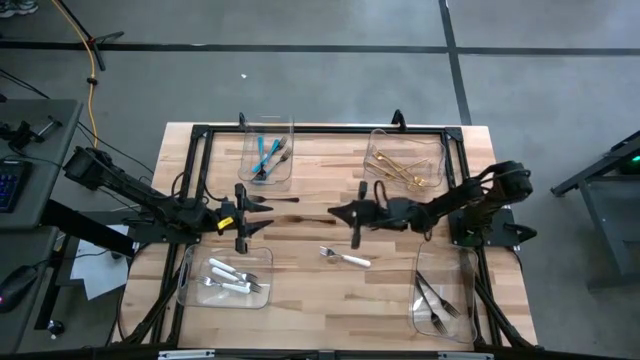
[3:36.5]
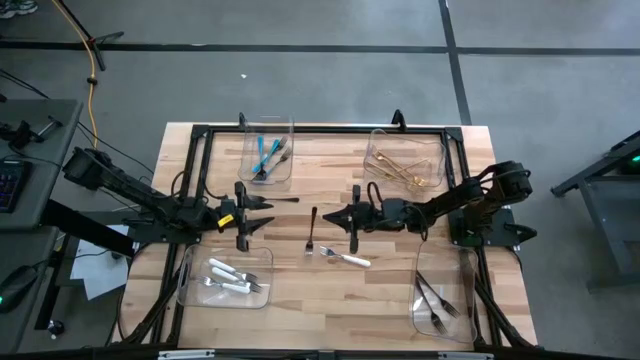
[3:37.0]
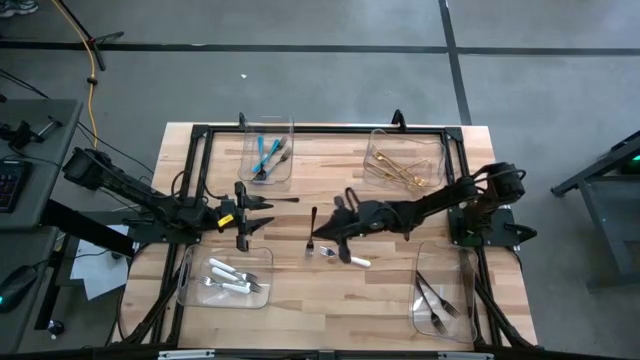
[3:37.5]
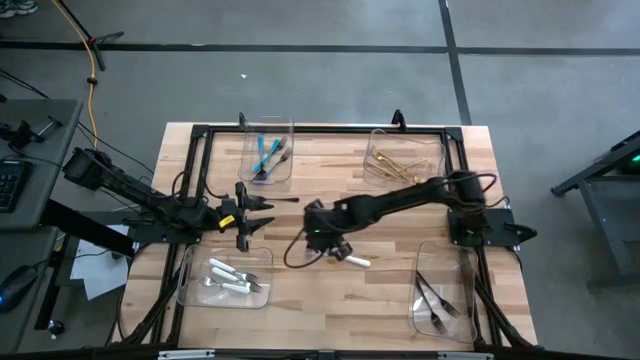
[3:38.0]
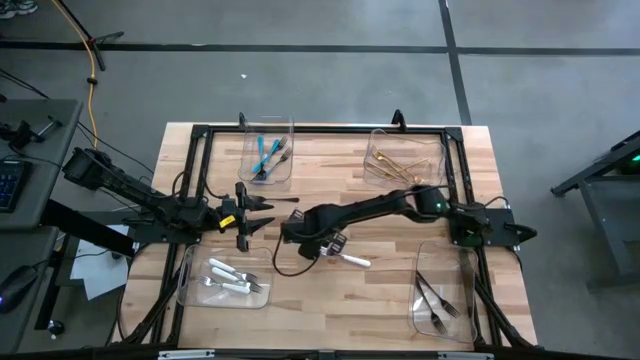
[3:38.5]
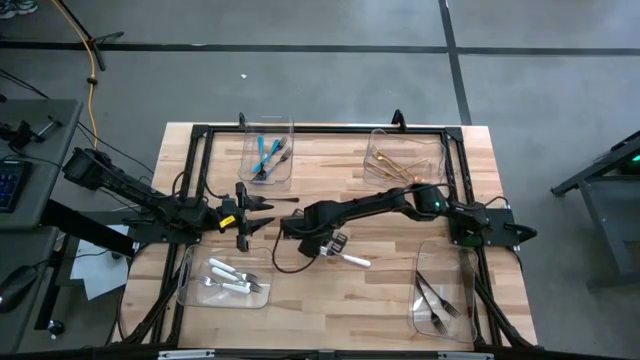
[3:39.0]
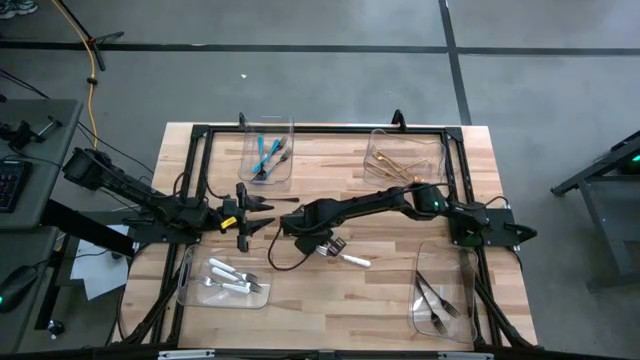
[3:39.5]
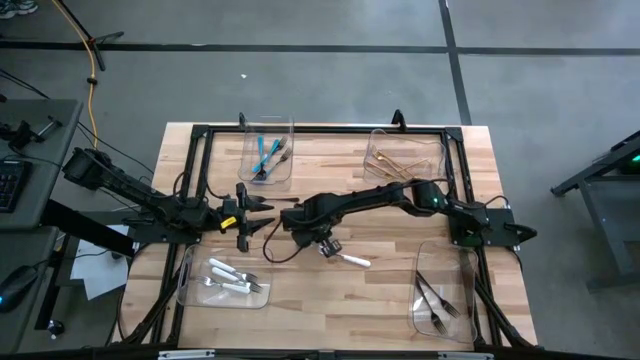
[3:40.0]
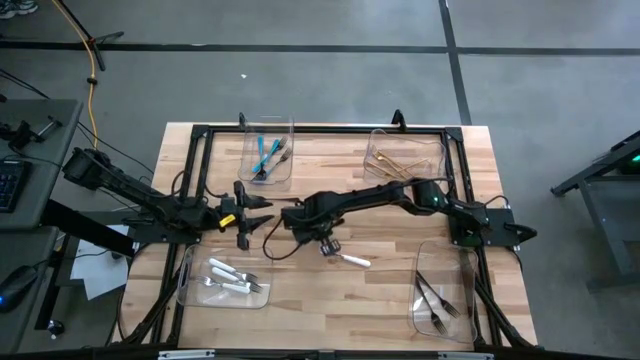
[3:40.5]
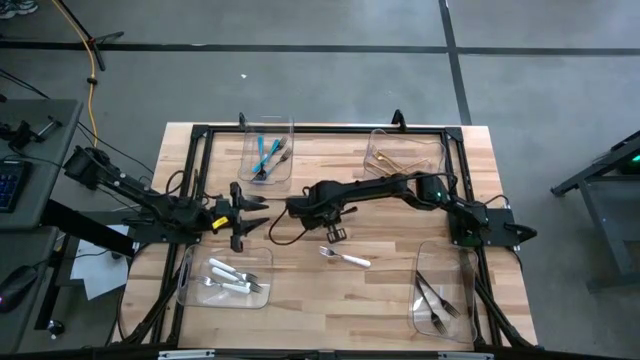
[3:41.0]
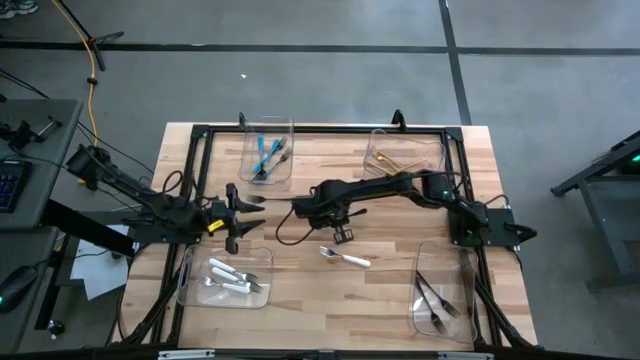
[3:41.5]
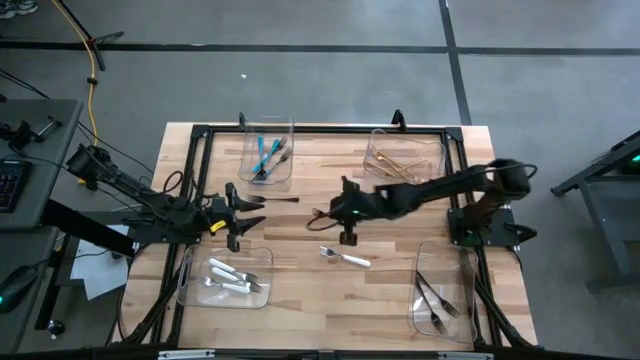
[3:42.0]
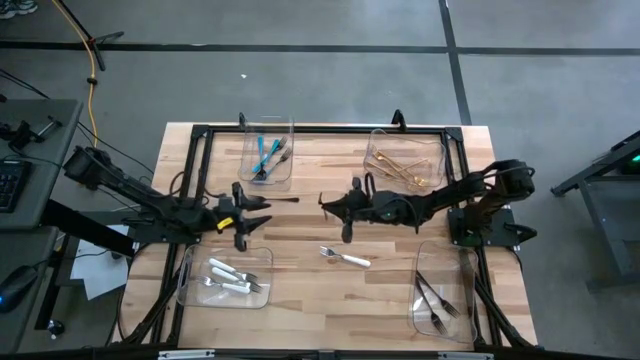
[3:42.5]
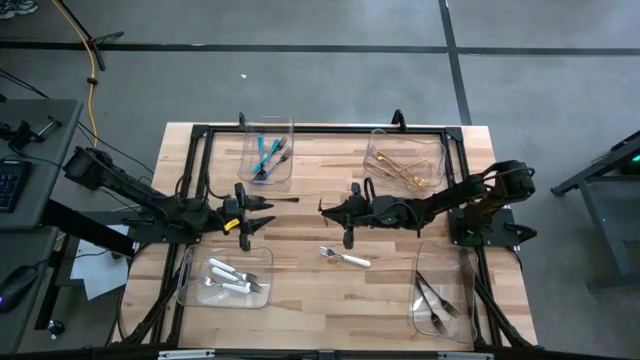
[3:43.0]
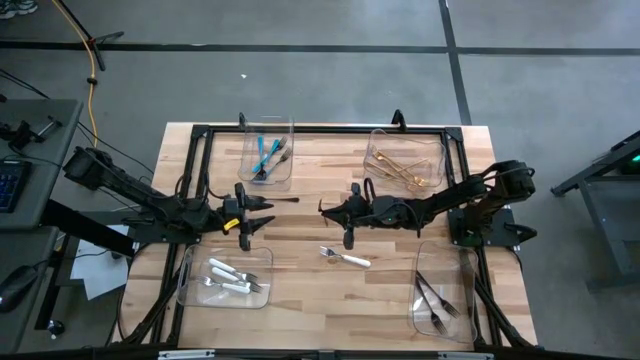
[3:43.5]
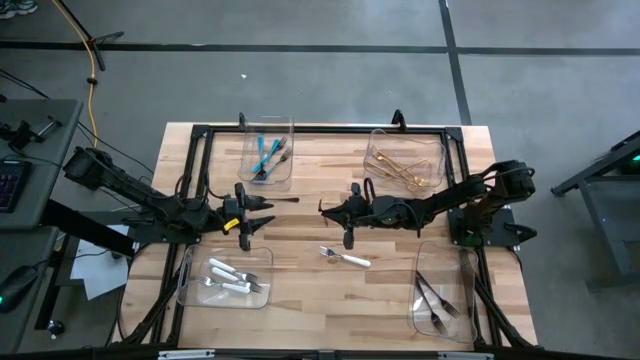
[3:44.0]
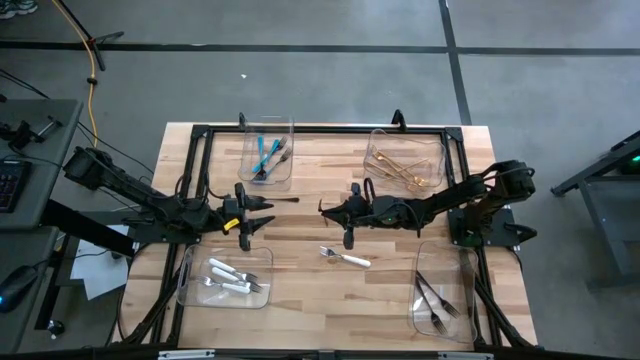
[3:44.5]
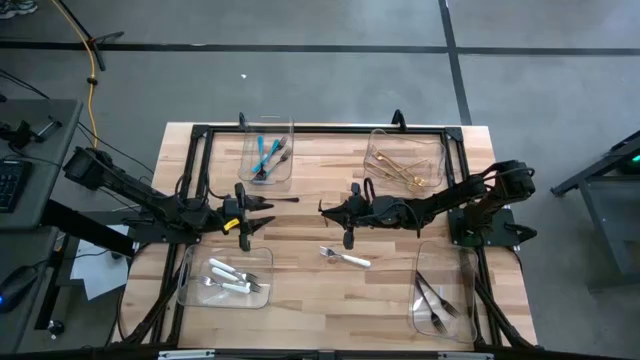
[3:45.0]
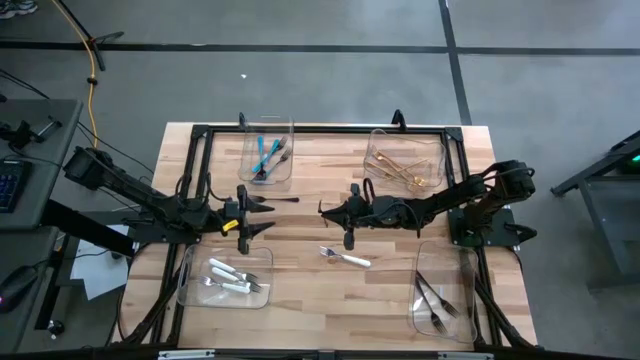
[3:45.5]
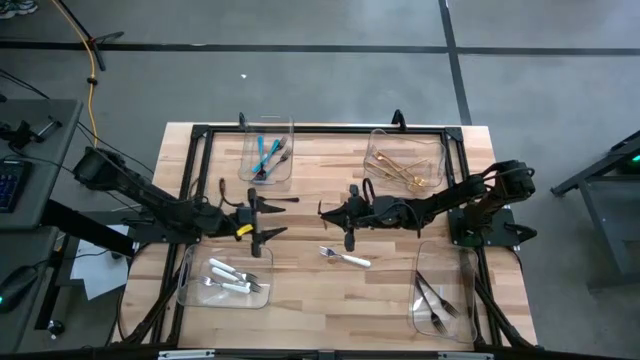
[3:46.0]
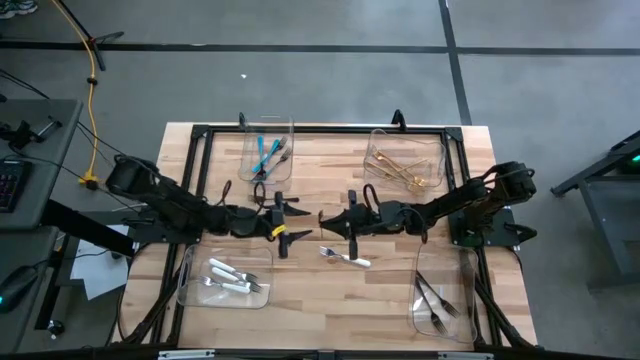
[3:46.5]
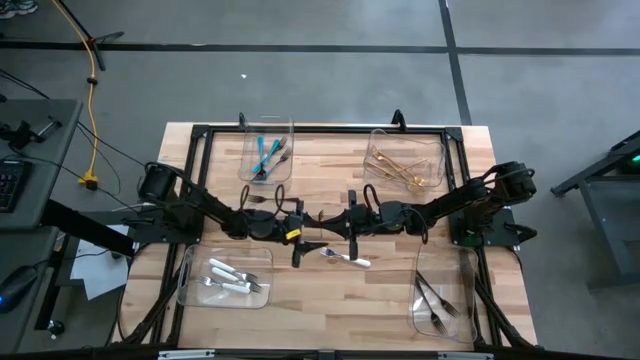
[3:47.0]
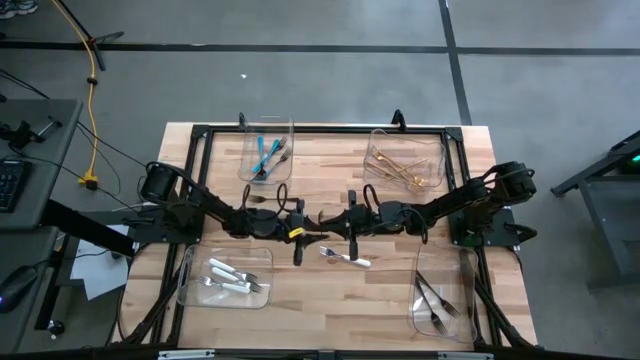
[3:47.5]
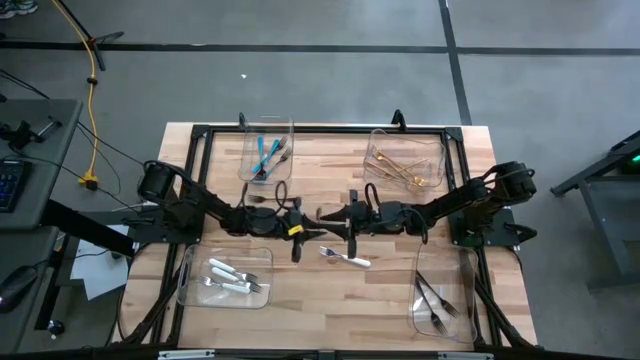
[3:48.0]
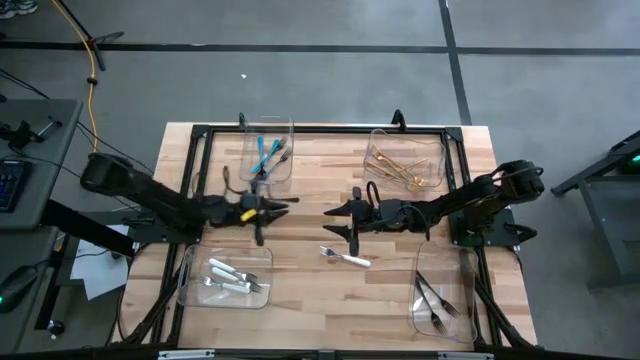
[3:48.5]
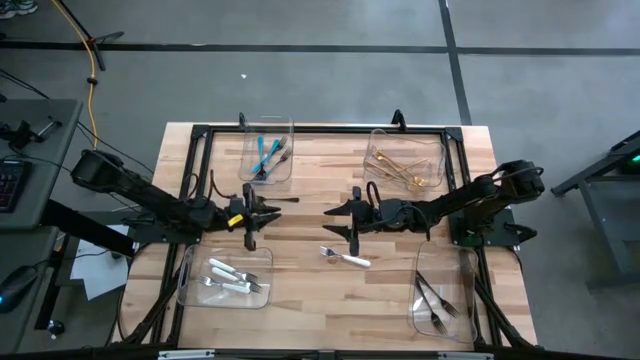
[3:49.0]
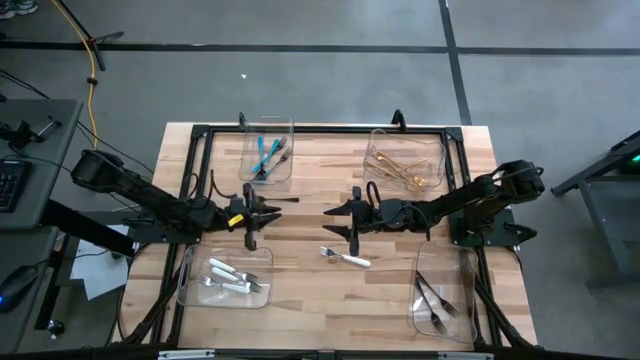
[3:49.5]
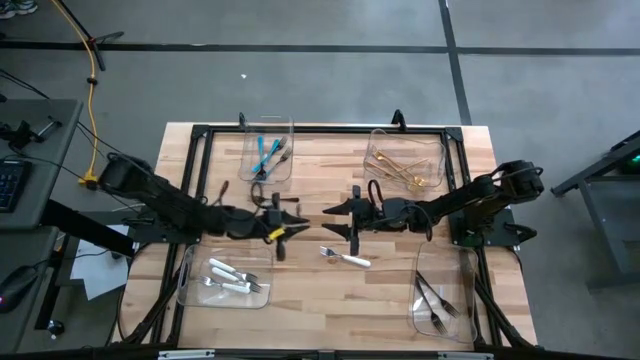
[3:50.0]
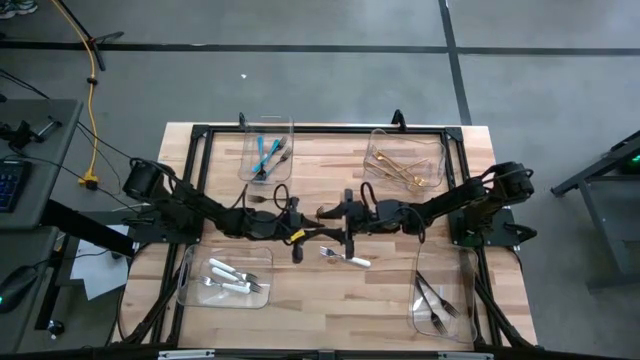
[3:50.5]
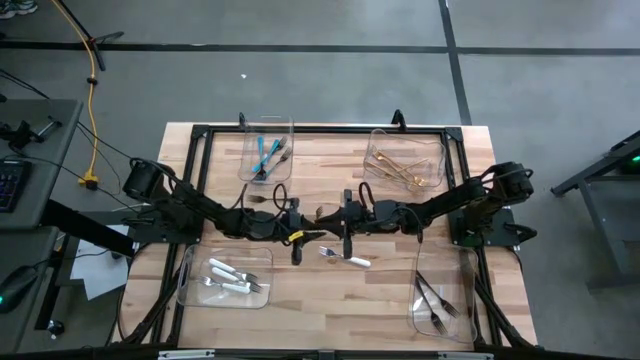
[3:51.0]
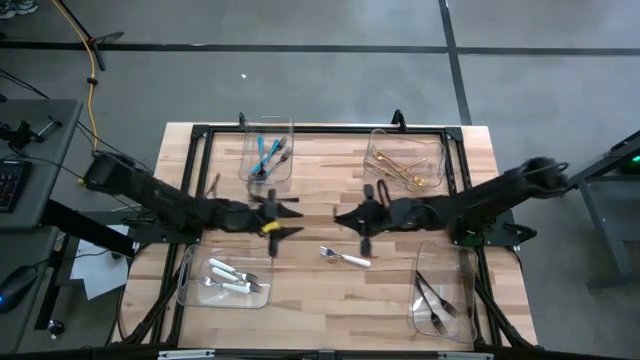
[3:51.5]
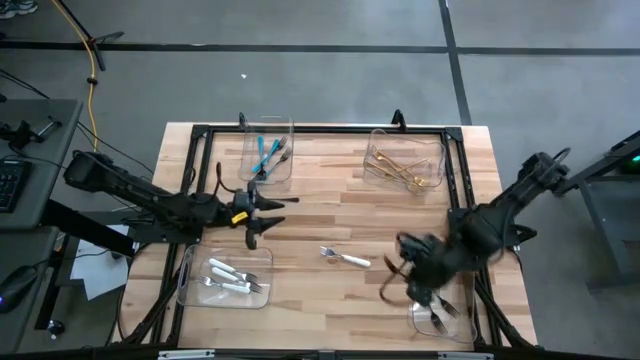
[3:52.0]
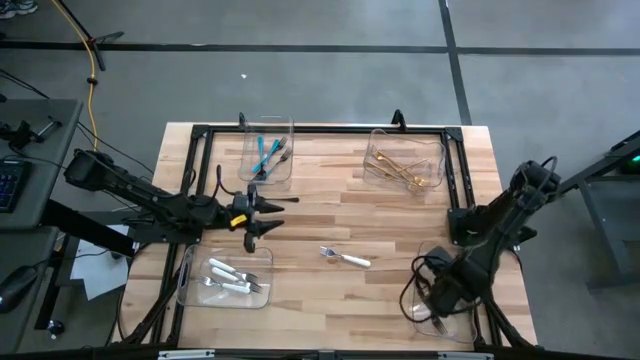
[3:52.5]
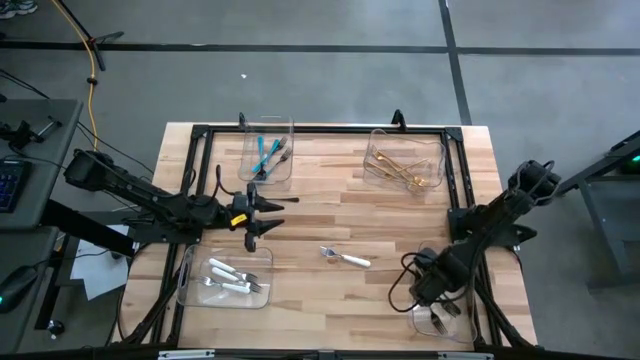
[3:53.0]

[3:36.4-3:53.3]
Task: Sort silverware by color (type)
Put the black fork into the bottom right transparent bin

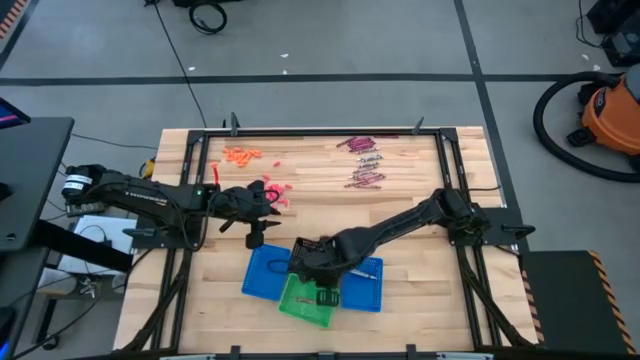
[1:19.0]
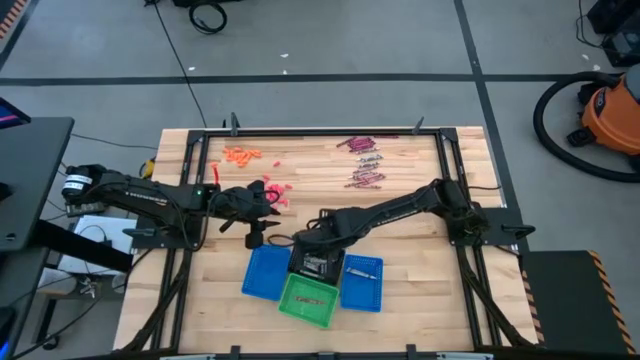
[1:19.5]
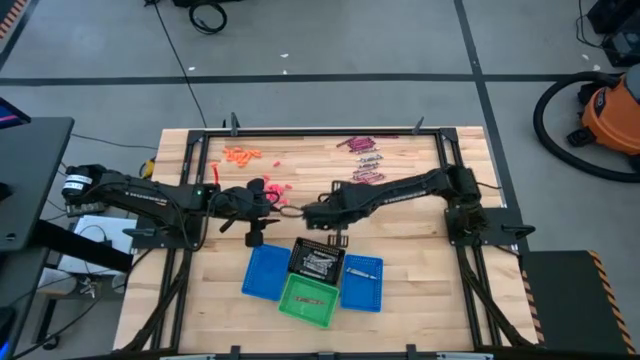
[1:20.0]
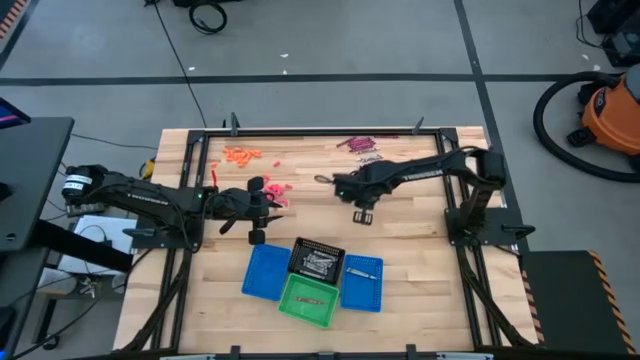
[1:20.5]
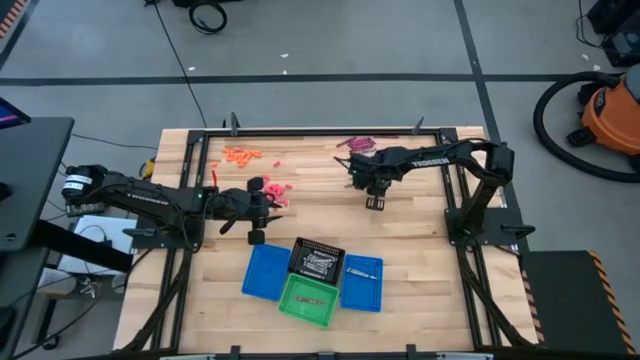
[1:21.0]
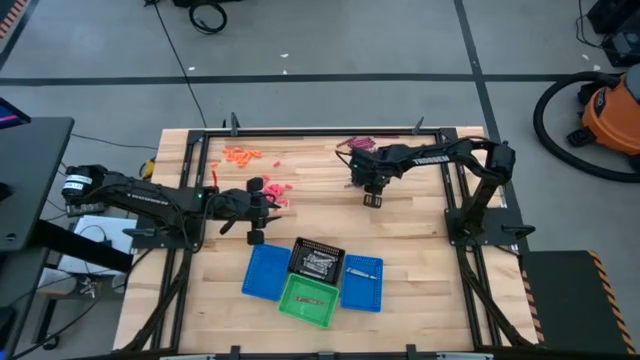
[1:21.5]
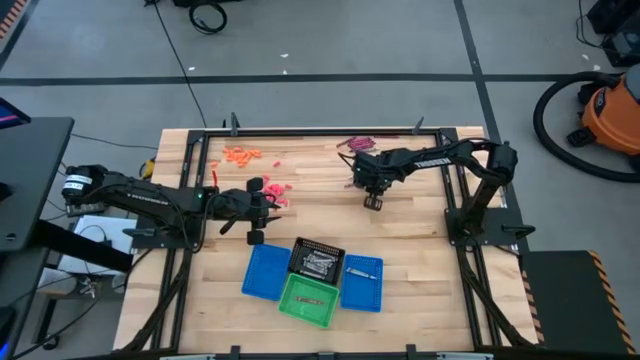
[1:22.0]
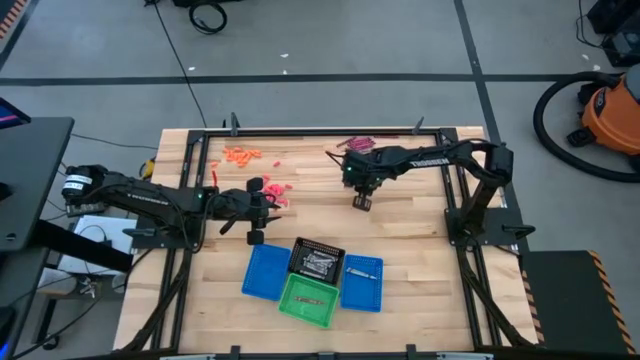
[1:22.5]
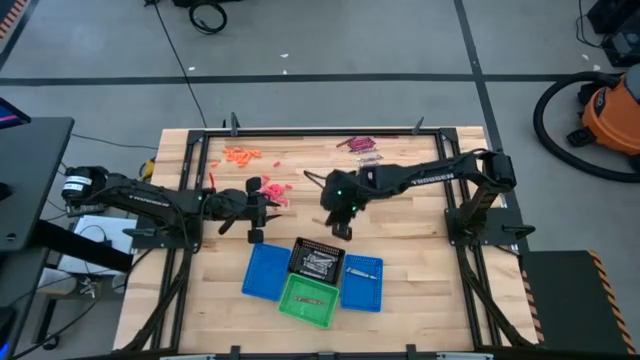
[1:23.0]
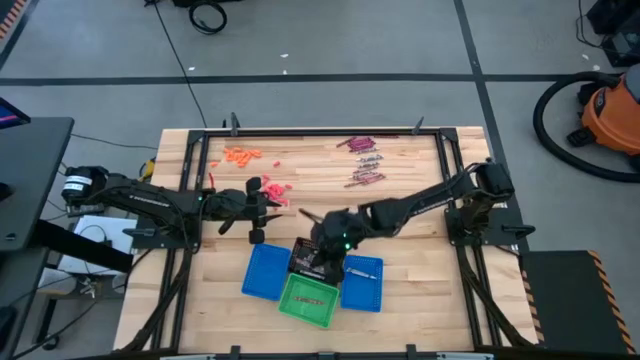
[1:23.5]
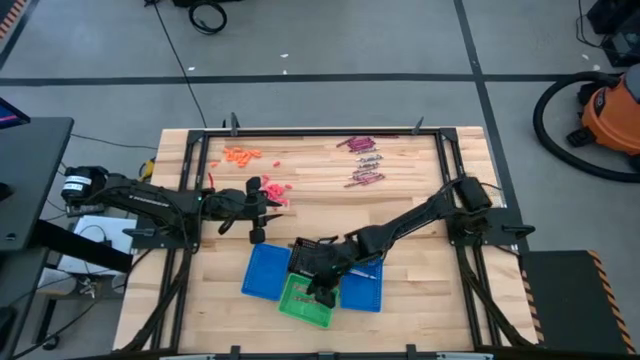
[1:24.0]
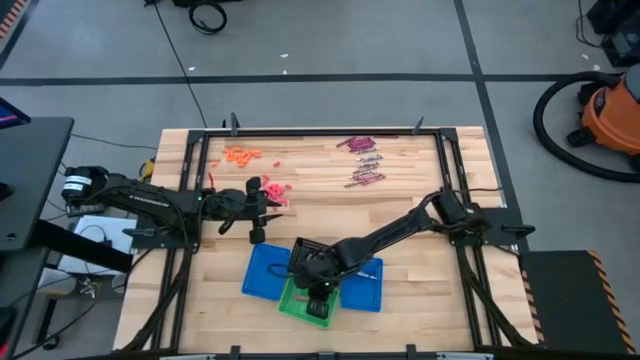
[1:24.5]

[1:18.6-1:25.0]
Task: Sort crayons
Put the pink crayon into the green bin
